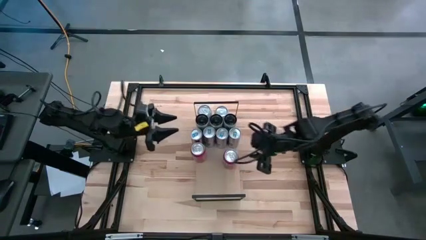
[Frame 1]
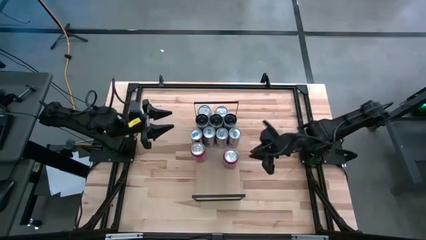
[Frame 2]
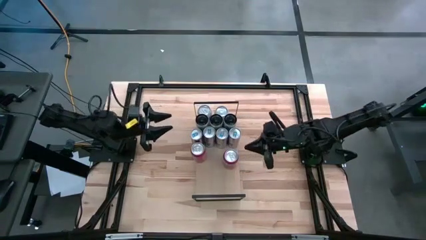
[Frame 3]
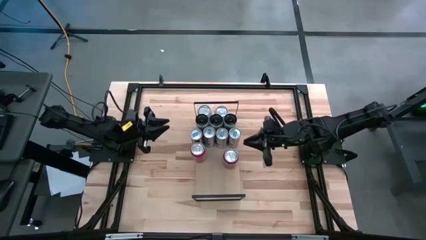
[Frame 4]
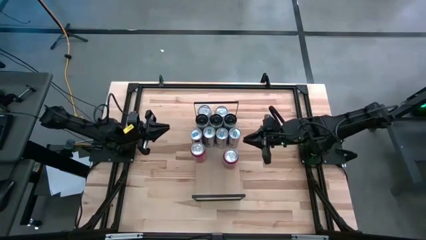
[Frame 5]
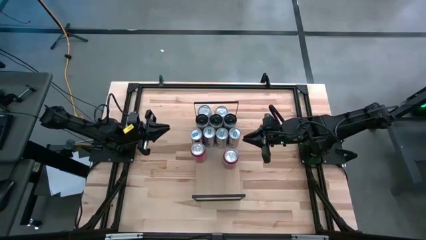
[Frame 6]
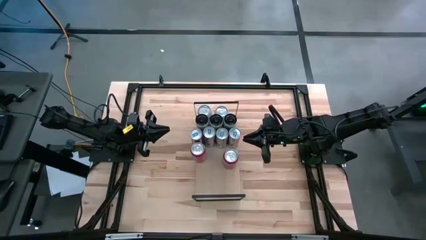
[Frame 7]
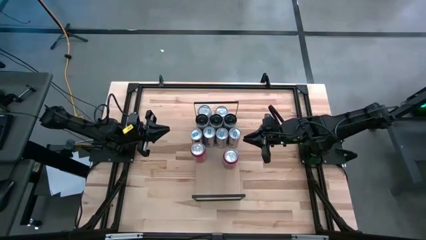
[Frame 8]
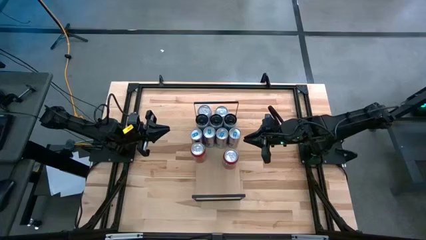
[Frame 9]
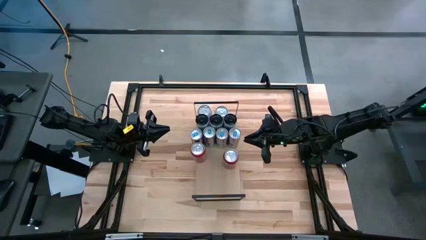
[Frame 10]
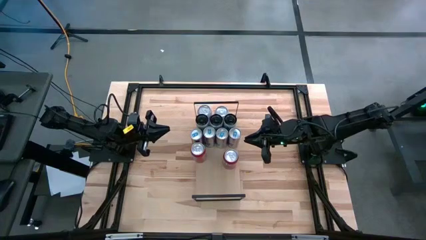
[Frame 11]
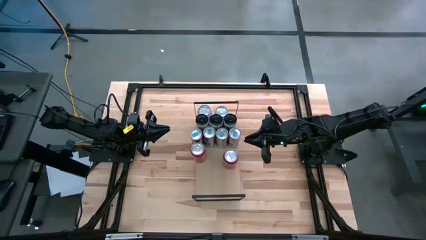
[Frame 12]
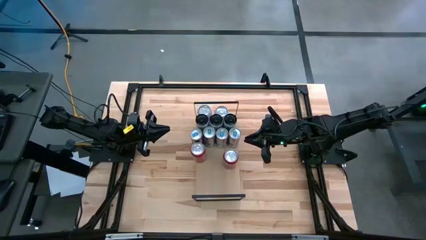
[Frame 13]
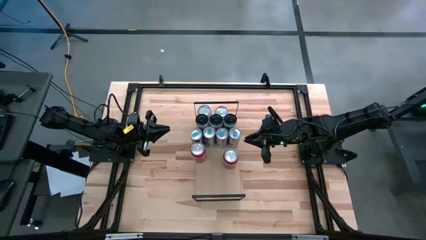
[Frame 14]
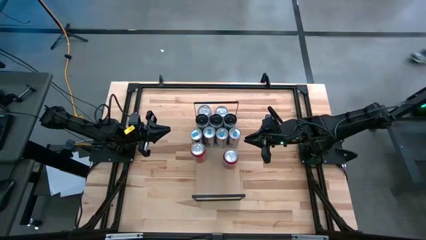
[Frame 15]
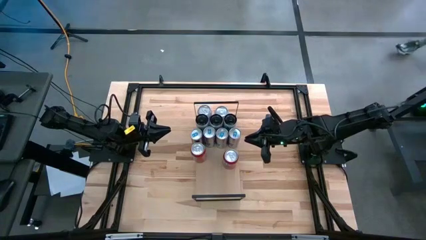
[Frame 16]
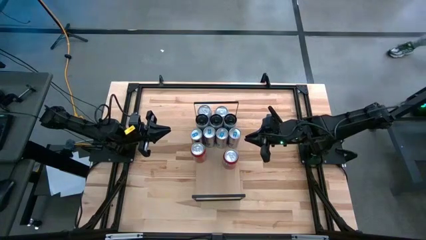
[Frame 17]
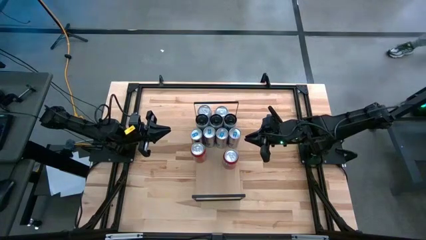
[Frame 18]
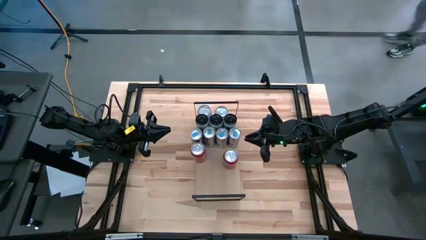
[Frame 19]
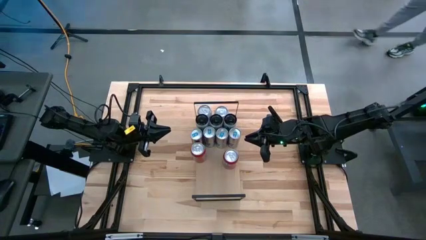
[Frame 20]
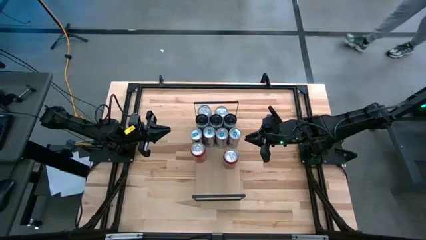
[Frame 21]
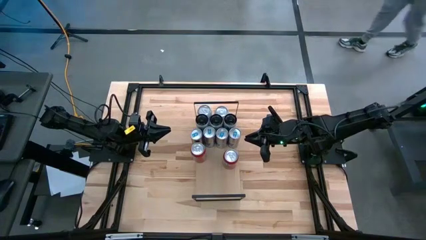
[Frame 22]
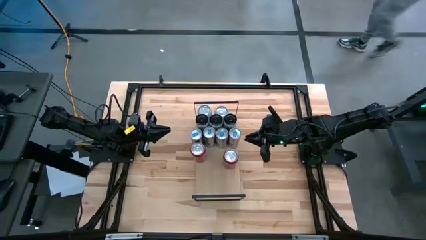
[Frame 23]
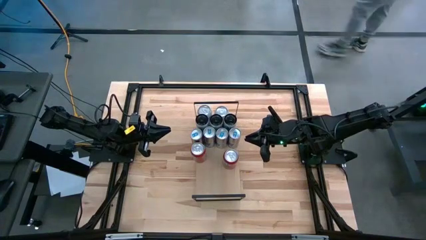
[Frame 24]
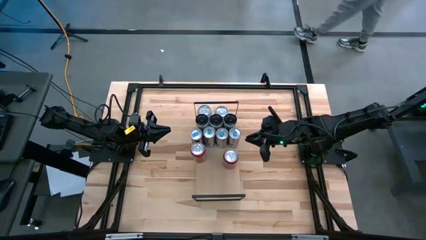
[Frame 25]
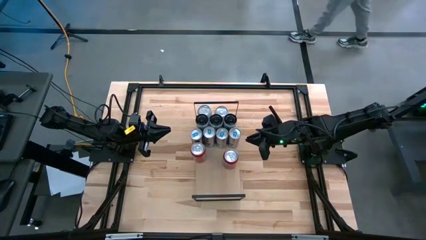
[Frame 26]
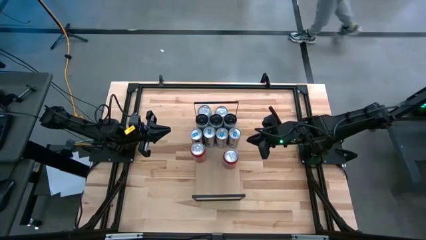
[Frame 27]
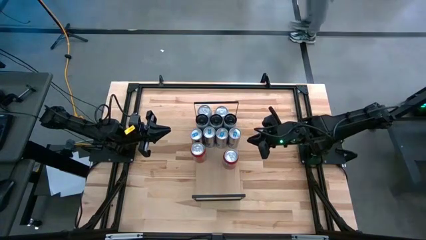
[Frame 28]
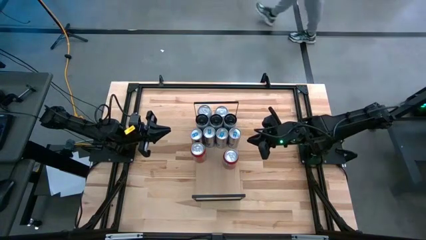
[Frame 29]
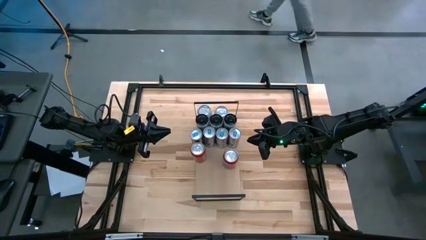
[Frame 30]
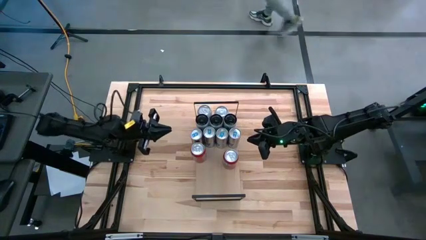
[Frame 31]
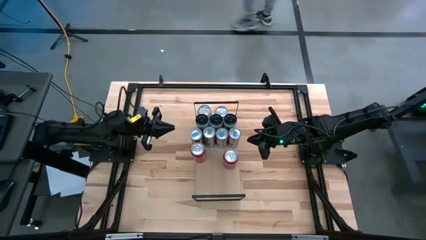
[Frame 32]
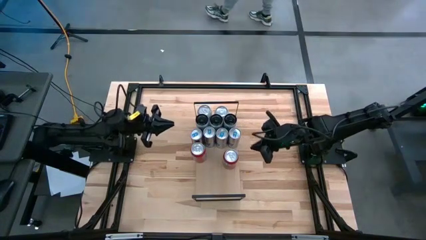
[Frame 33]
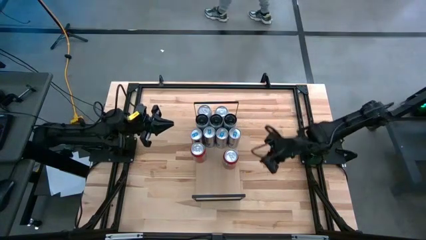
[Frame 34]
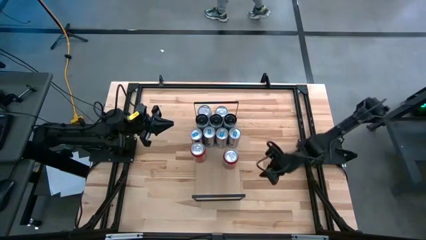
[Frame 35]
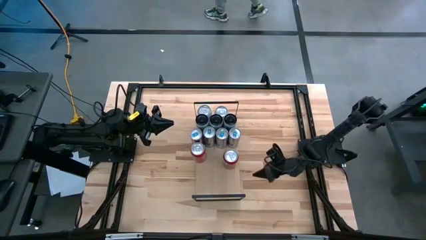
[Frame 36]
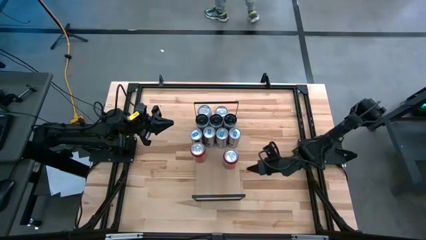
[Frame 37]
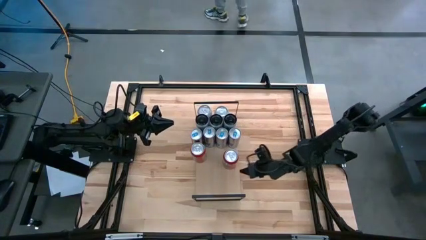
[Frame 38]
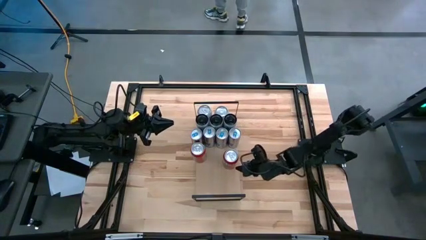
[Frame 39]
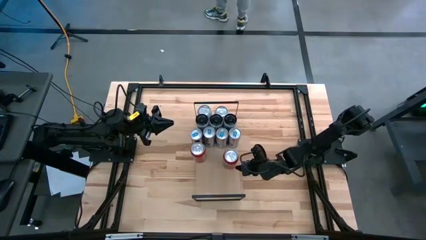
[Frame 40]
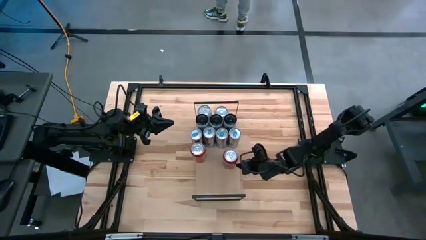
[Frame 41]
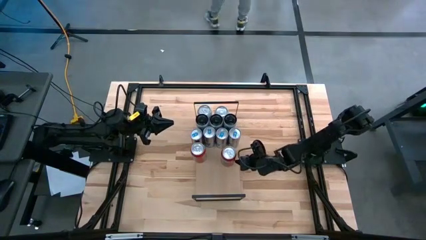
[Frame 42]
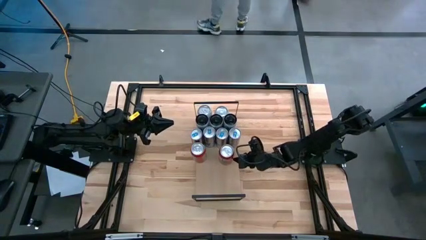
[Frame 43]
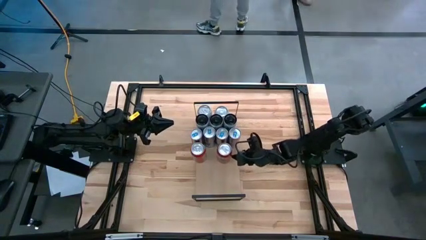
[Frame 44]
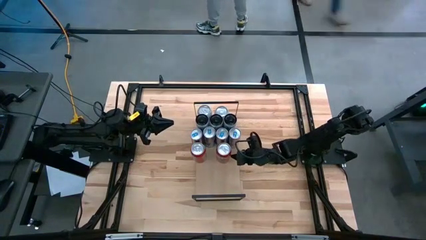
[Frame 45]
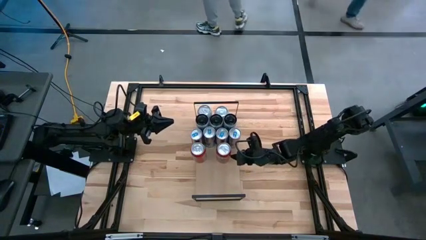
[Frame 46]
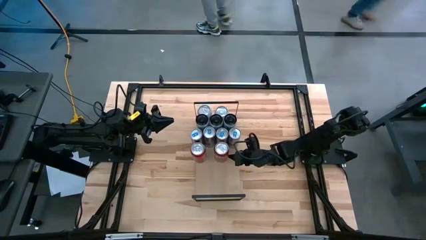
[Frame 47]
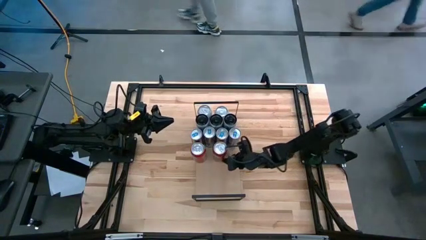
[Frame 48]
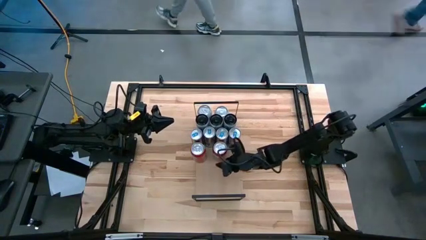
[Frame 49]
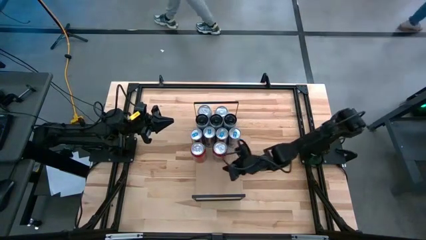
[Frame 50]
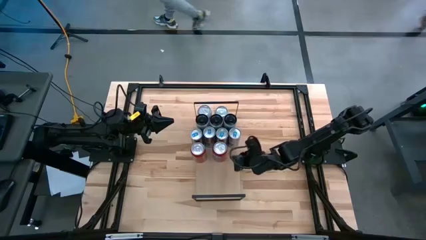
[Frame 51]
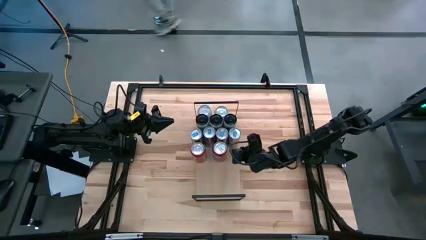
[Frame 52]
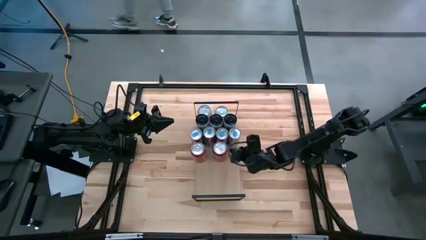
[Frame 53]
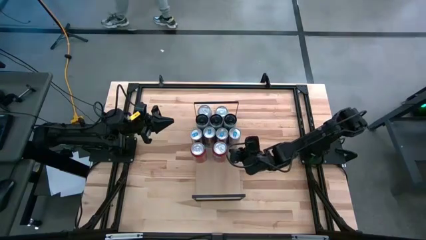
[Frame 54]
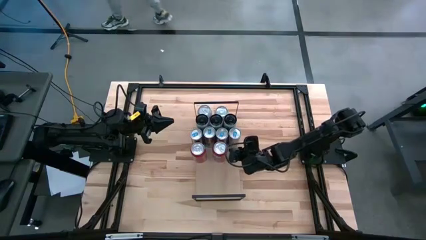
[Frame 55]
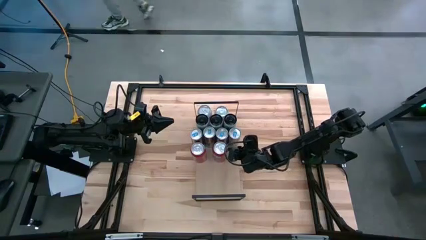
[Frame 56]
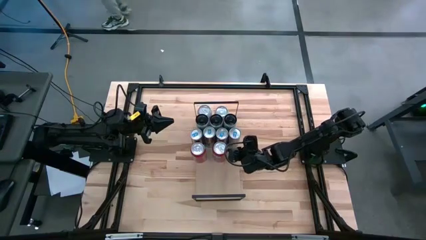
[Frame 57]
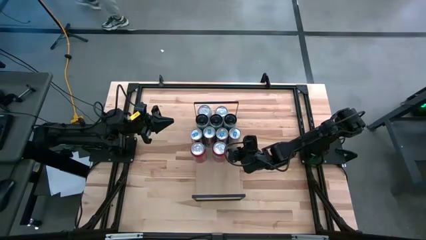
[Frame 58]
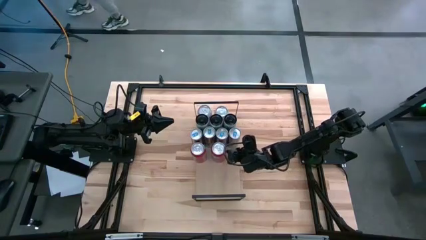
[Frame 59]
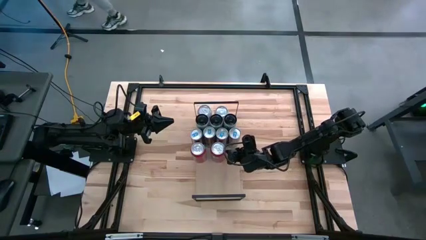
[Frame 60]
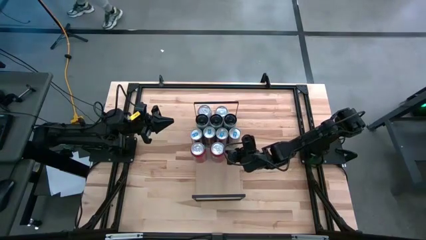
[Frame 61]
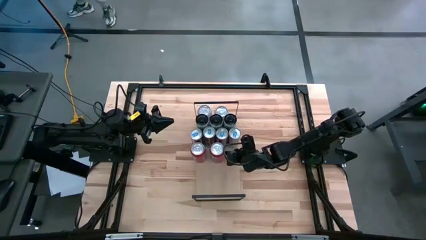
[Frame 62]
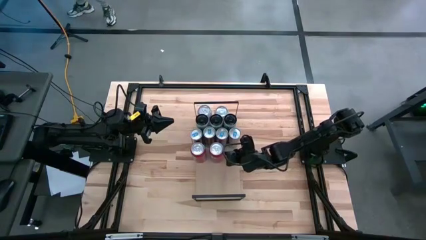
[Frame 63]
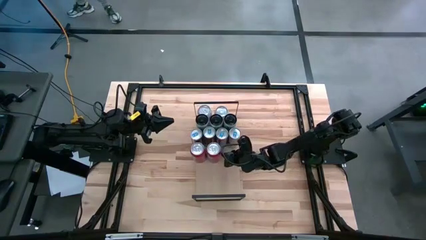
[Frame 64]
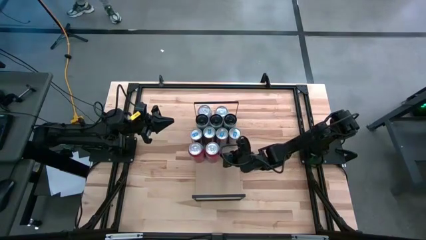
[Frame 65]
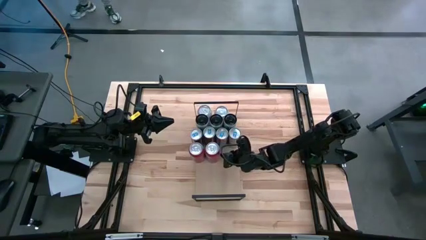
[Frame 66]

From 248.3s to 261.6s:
Task: Place canned beverage on shelf
Put the red soda can on the shelf aligned with the other red soda can

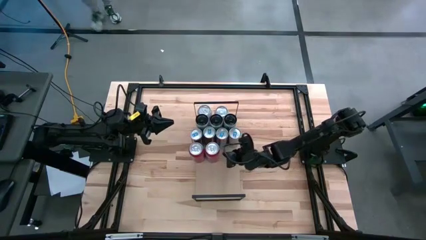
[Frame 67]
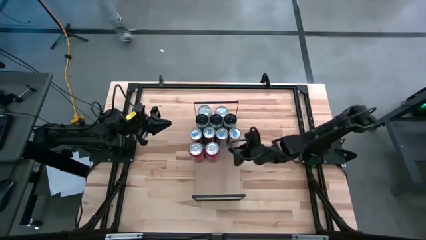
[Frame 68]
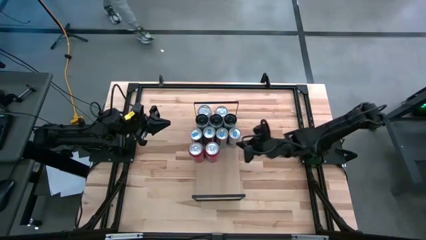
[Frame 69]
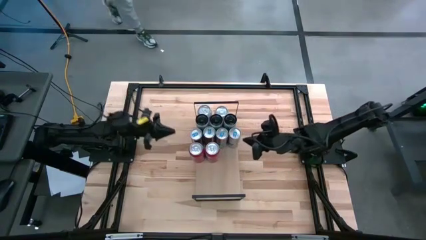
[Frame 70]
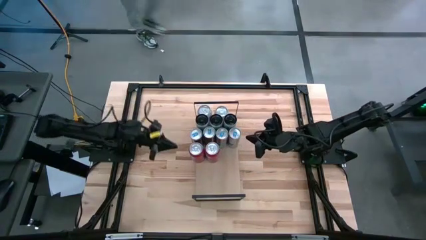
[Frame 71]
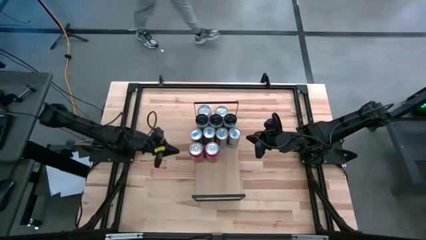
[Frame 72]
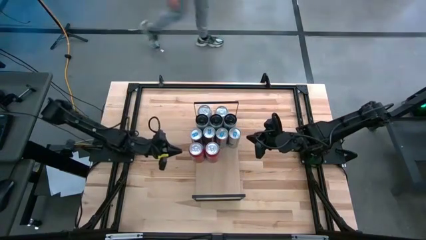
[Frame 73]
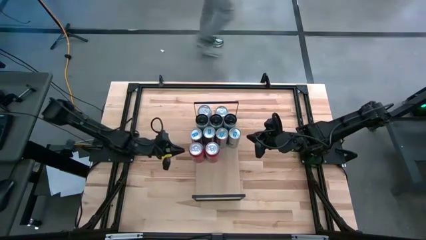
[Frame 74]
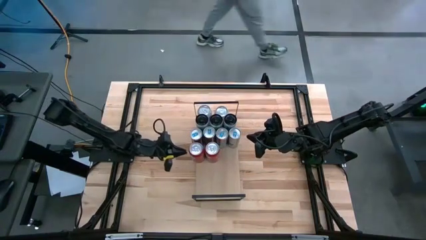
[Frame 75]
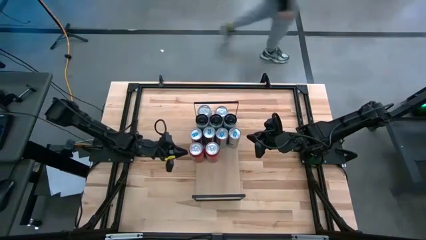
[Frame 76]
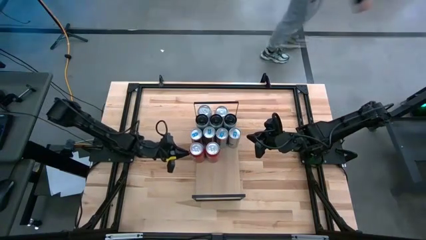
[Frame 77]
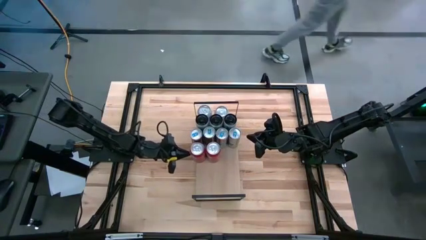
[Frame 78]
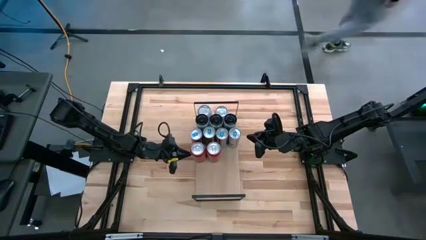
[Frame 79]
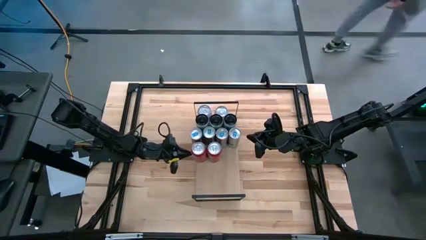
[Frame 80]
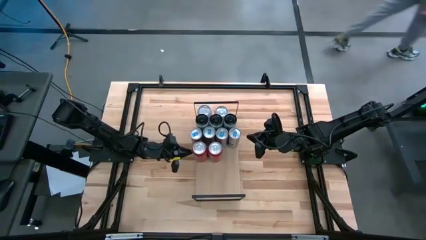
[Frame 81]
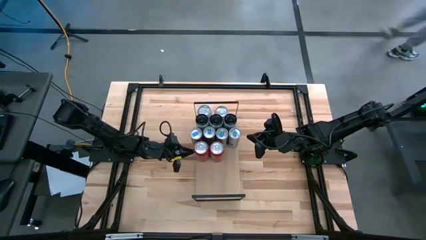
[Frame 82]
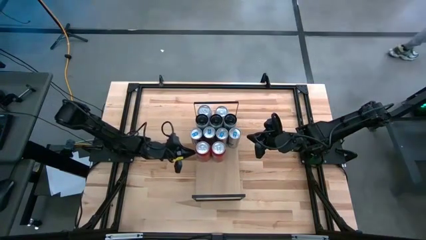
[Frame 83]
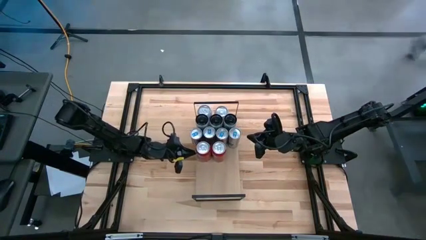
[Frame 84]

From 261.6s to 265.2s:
Adjust the red soda can on the shelf
